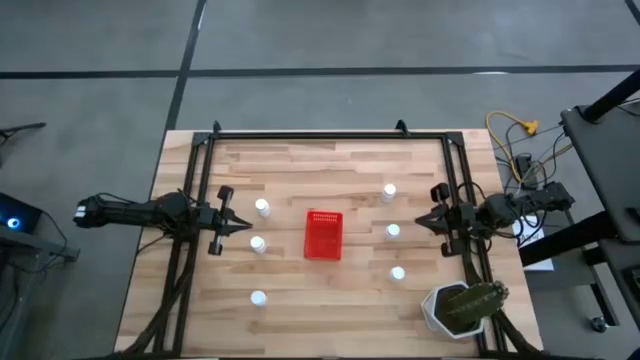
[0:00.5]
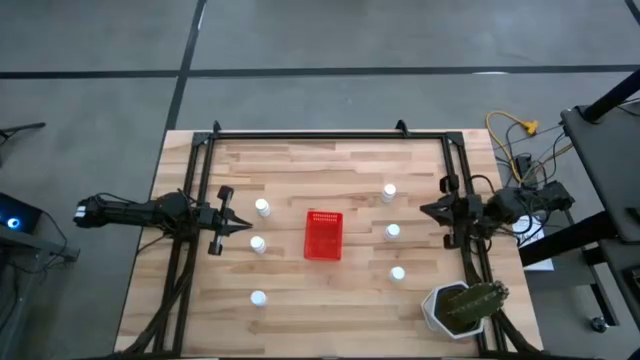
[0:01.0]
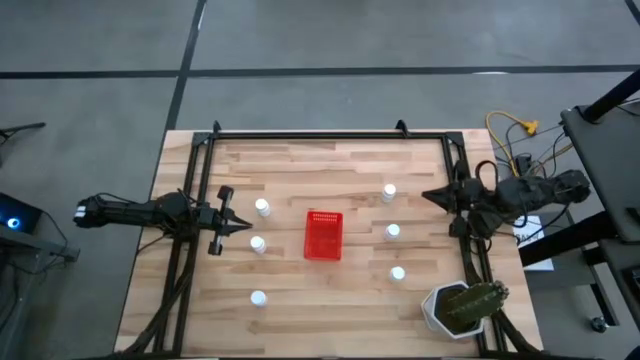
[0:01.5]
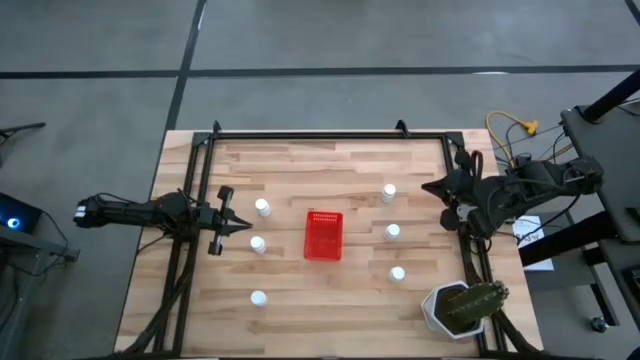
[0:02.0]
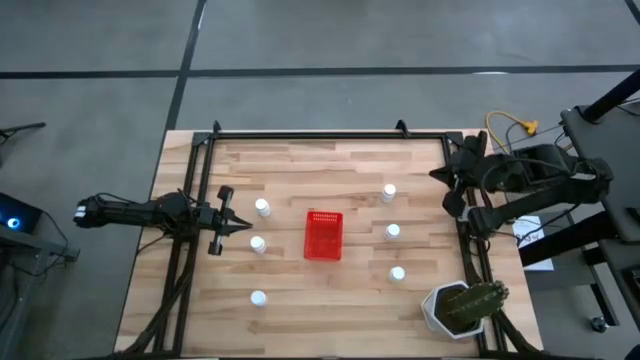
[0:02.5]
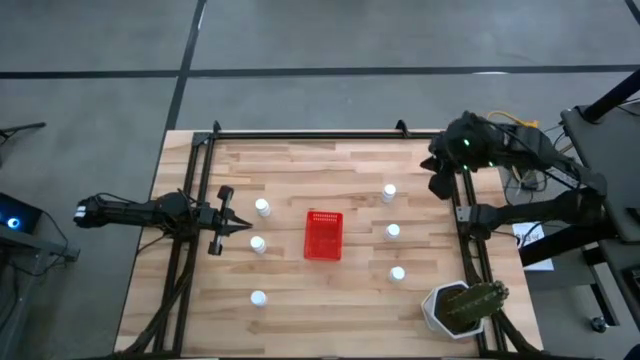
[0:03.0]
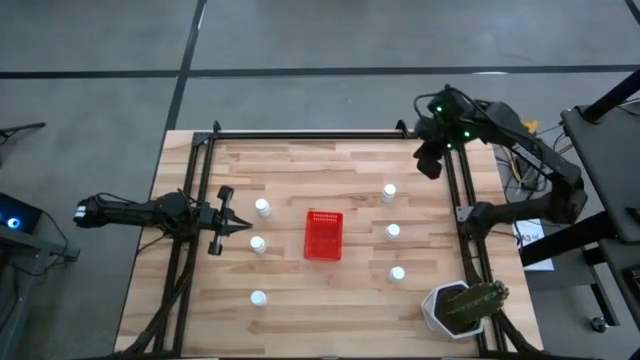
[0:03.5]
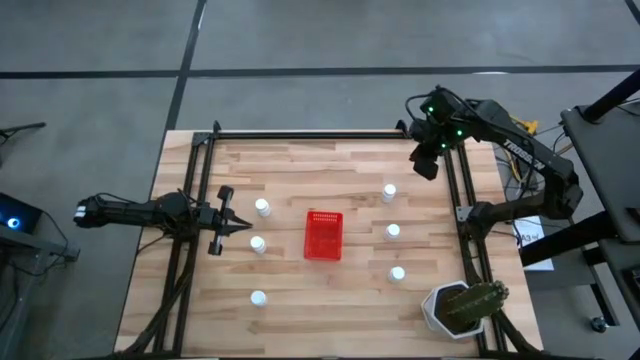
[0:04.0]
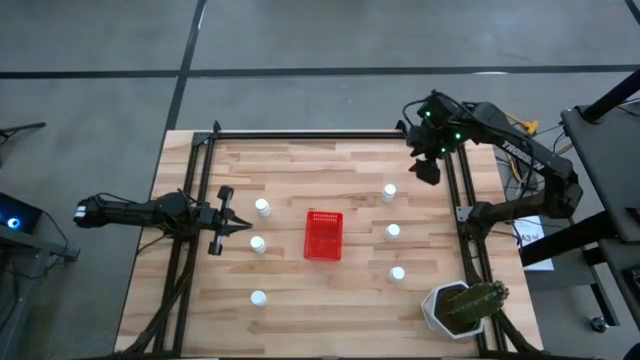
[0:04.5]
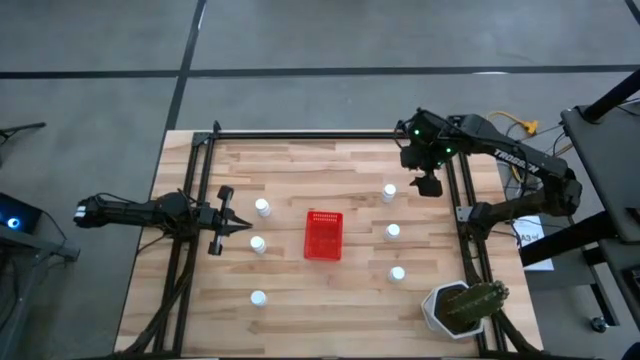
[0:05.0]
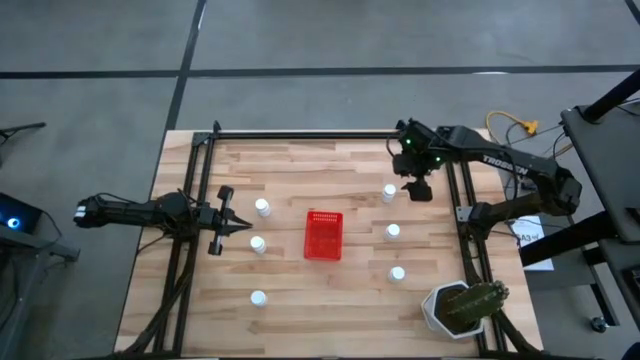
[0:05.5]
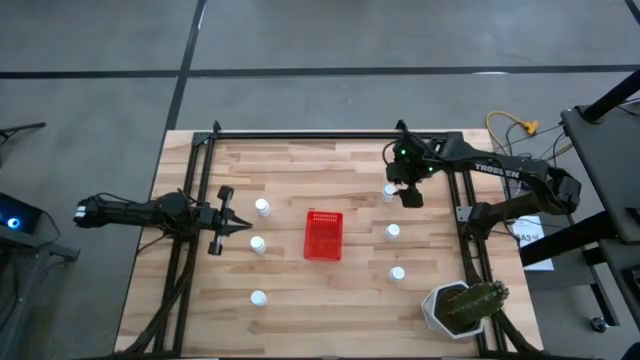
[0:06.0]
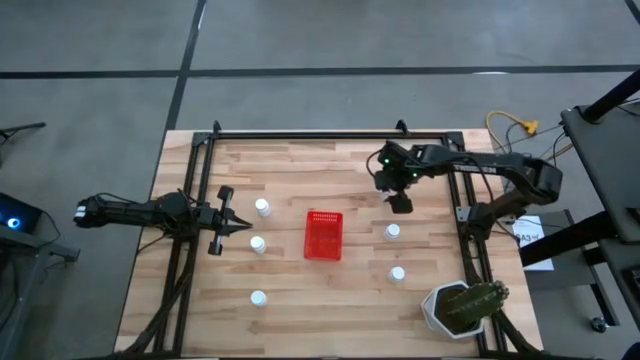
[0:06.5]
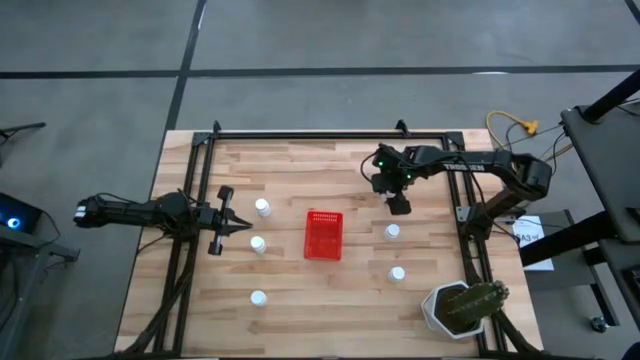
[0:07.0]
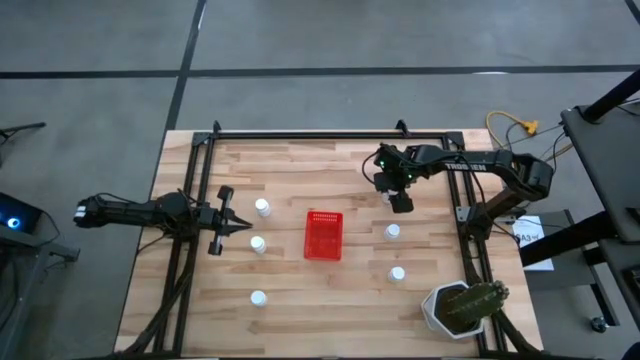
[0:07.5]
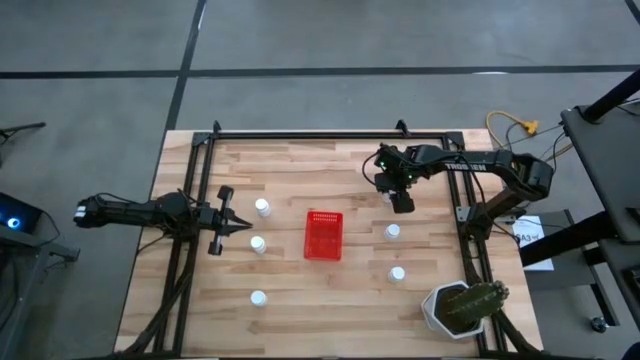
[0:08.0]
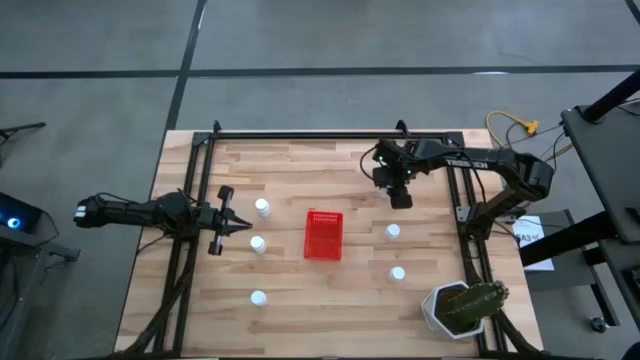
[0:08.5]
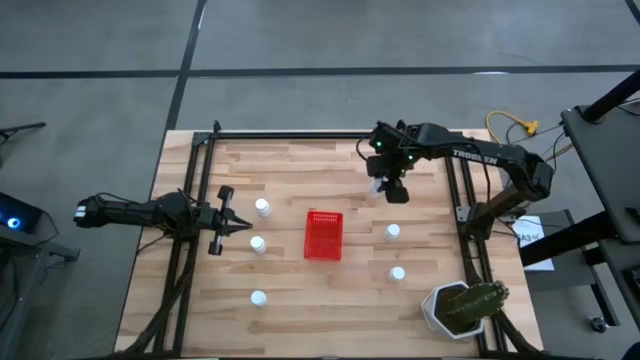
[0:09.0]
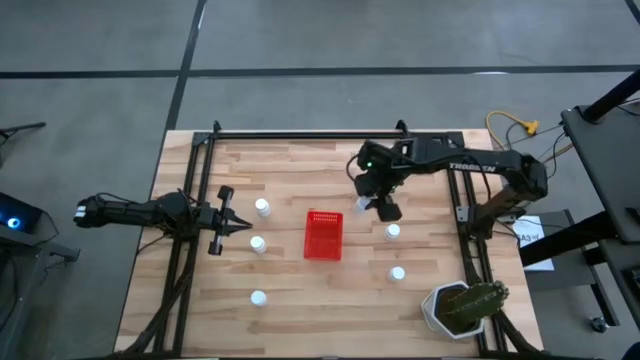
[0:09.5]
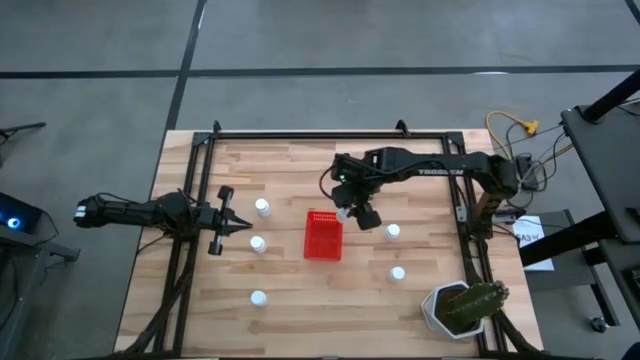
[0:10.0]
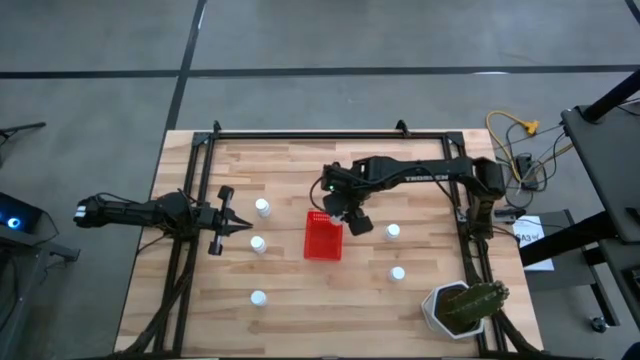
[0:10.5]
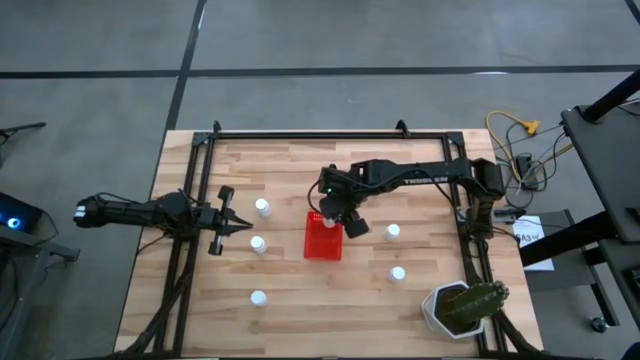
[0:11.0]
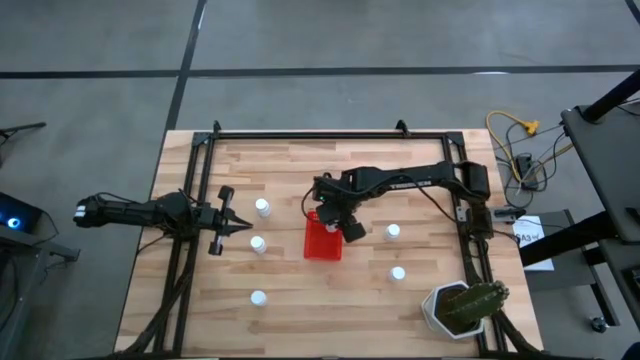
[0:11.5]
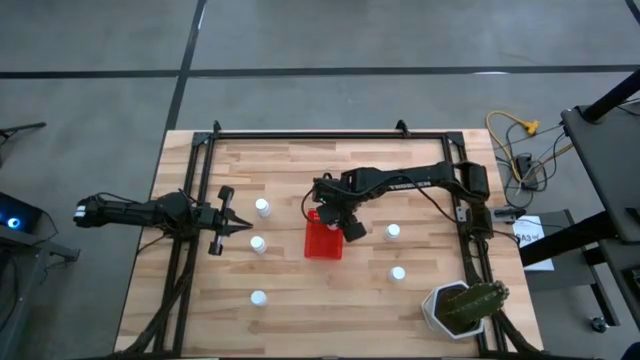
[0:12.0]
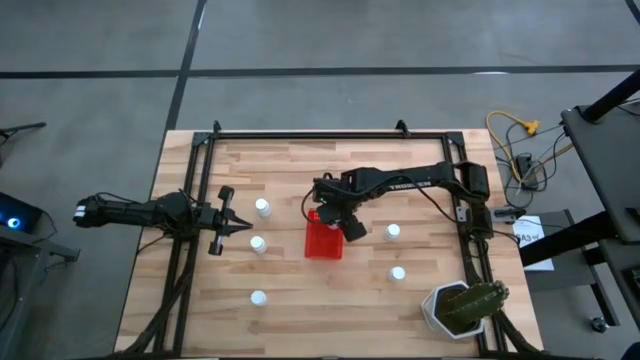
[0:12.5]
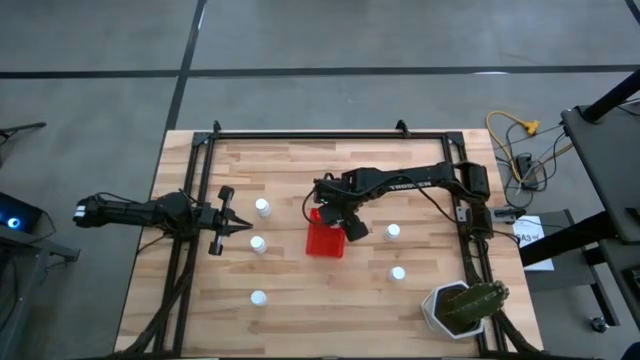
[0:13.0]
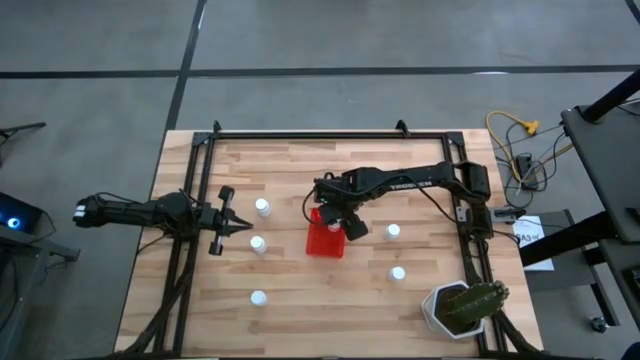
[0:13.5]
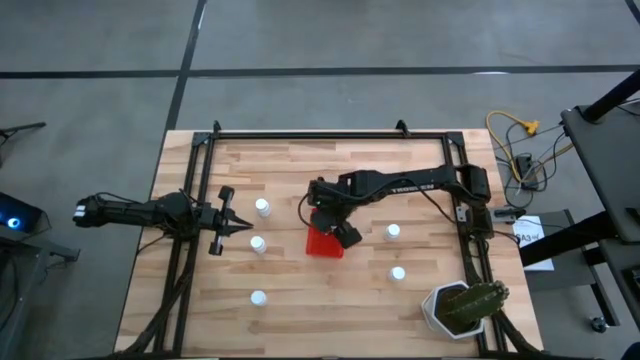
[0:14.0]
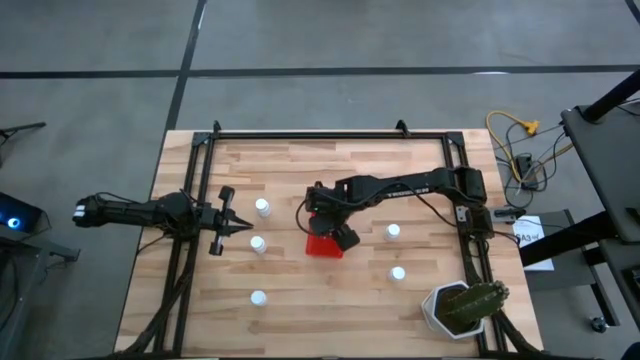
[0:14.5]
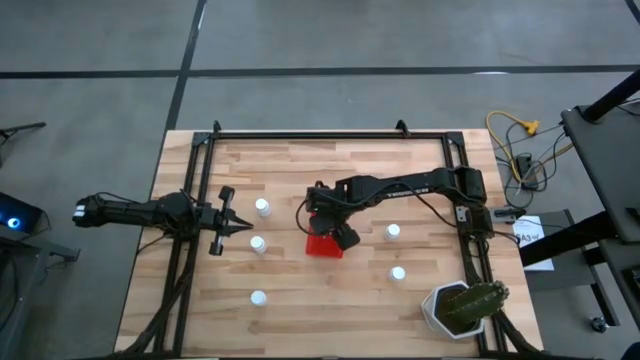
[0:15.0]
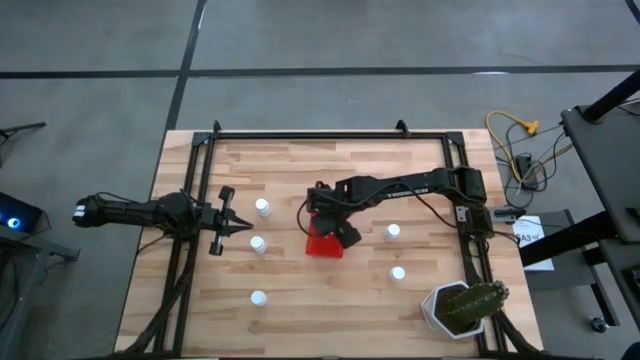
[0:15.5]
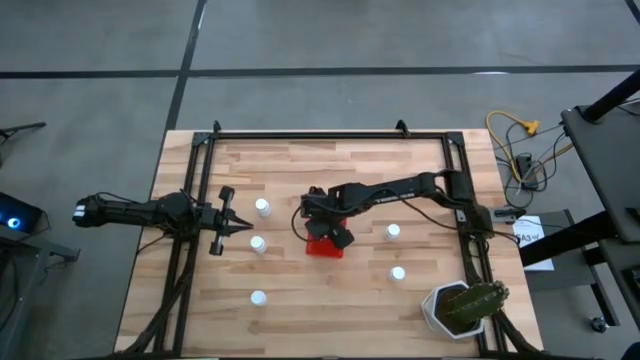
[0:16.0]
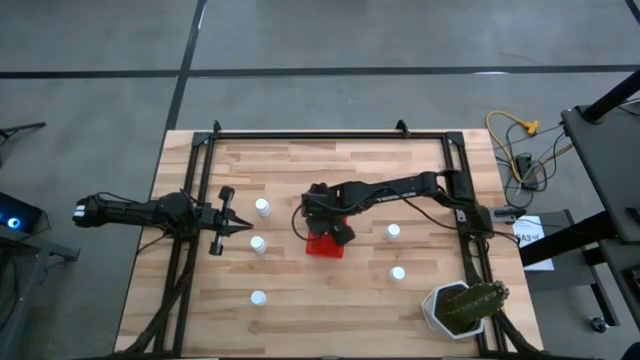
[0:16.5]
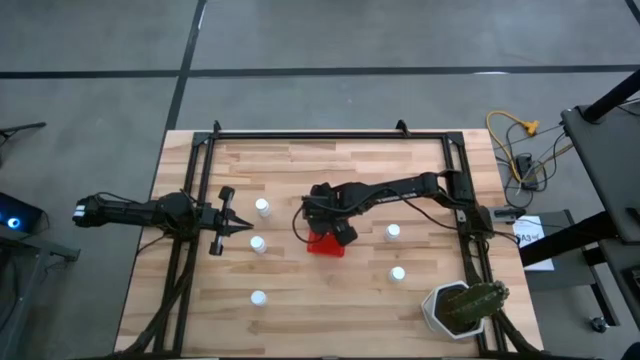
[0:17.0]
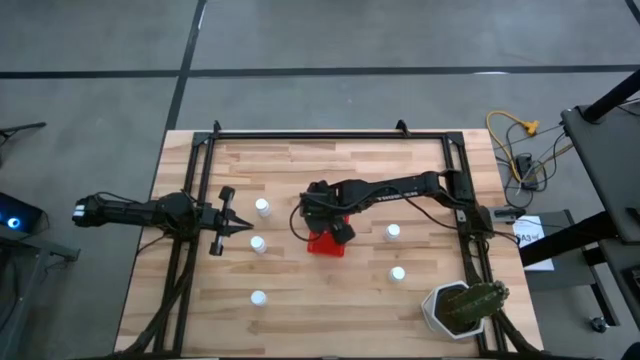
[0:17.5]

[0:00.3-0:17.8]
Task: Pick and place pill bottles into a basket
Put the white medicine bottle into the red bin
